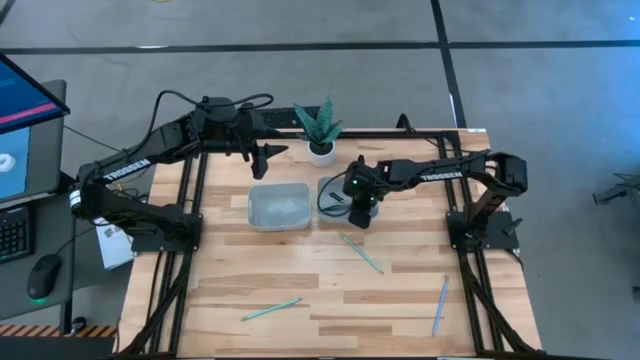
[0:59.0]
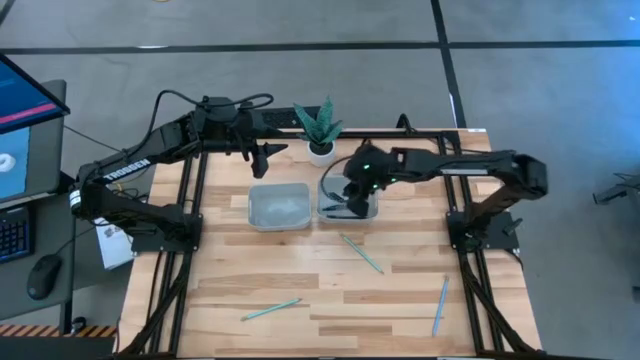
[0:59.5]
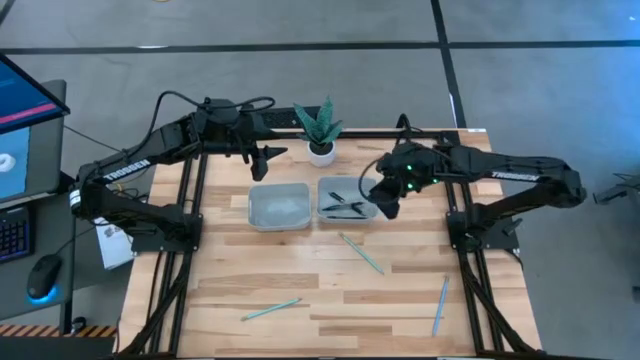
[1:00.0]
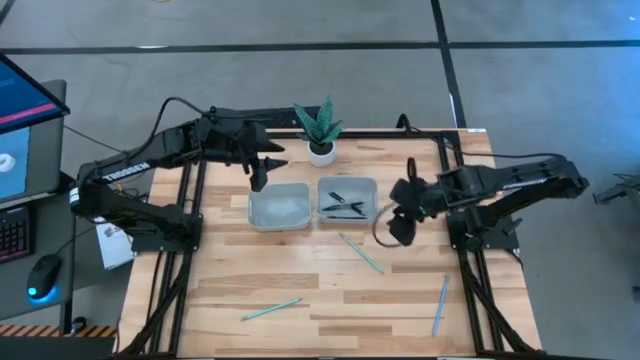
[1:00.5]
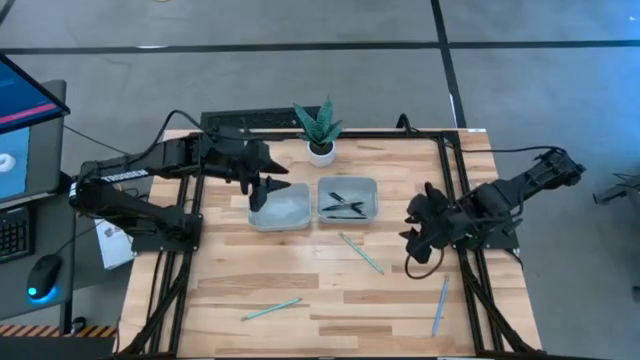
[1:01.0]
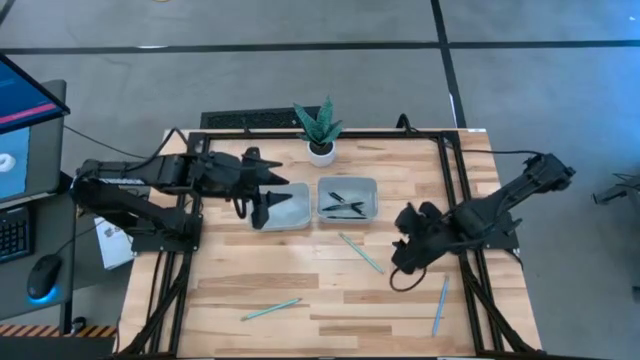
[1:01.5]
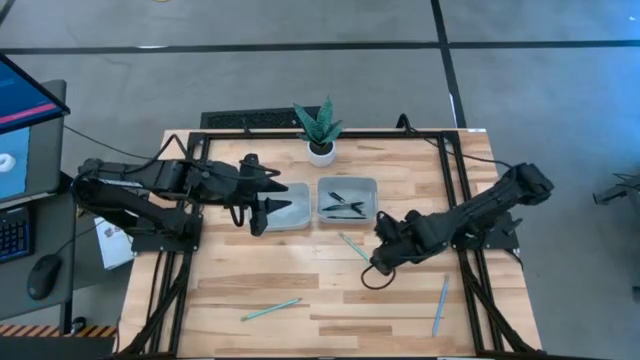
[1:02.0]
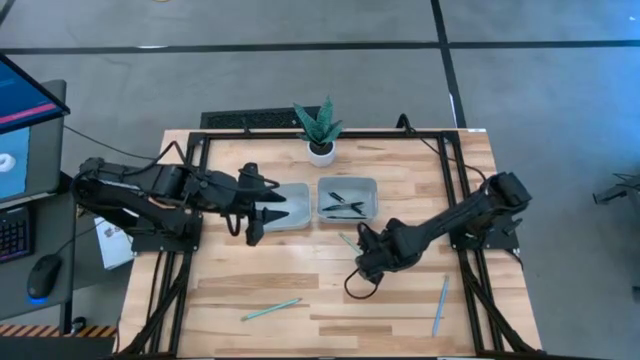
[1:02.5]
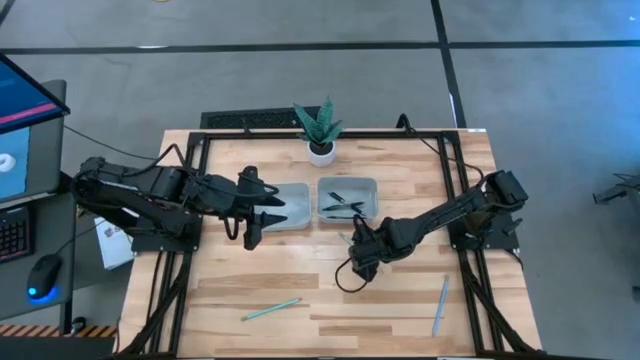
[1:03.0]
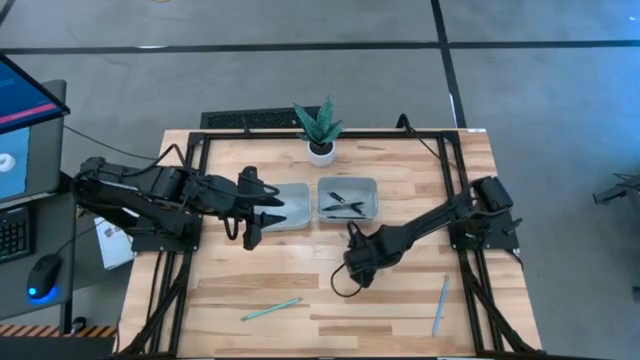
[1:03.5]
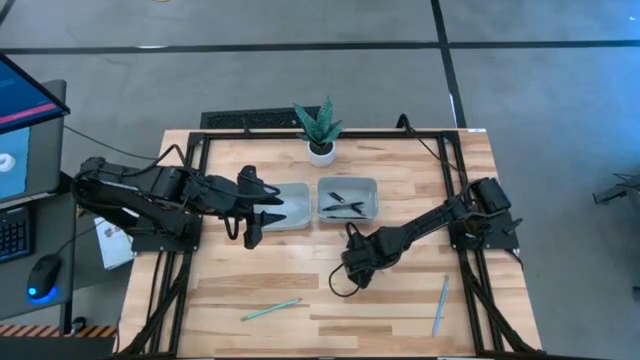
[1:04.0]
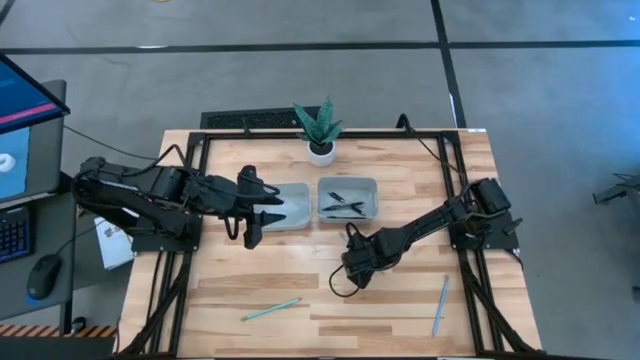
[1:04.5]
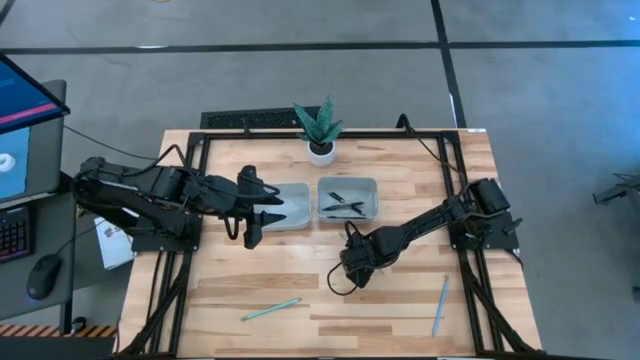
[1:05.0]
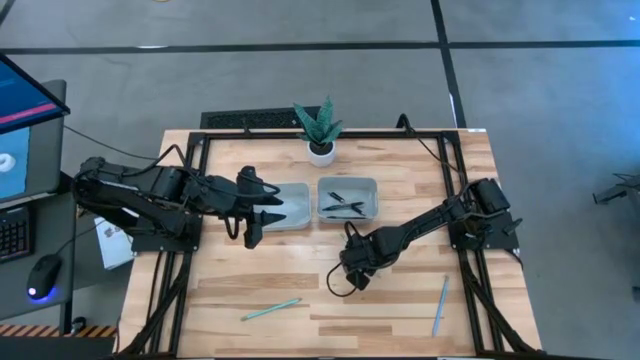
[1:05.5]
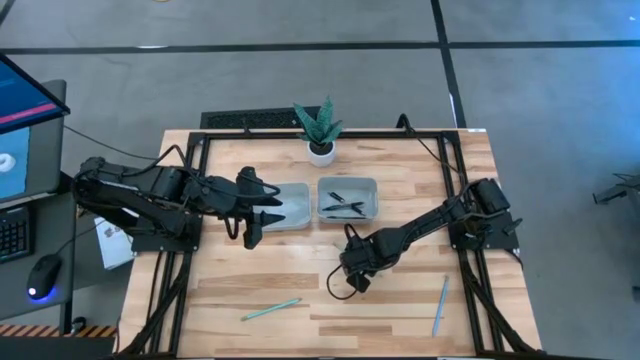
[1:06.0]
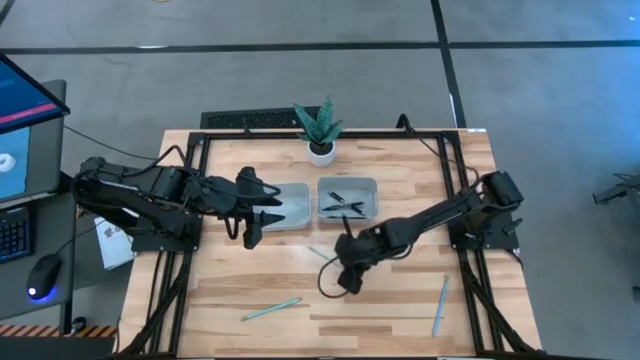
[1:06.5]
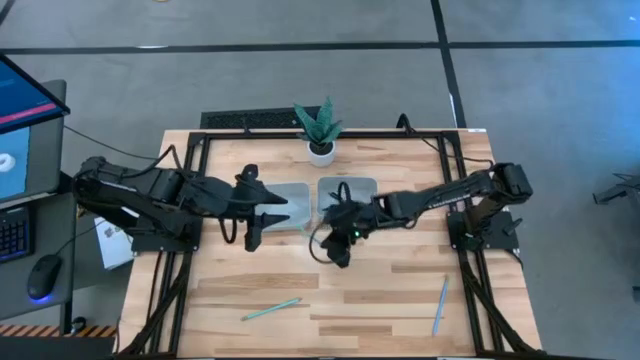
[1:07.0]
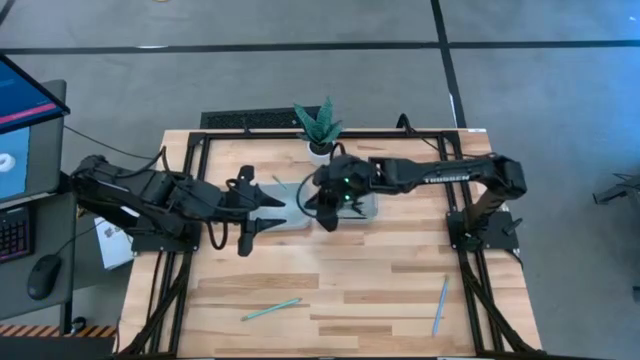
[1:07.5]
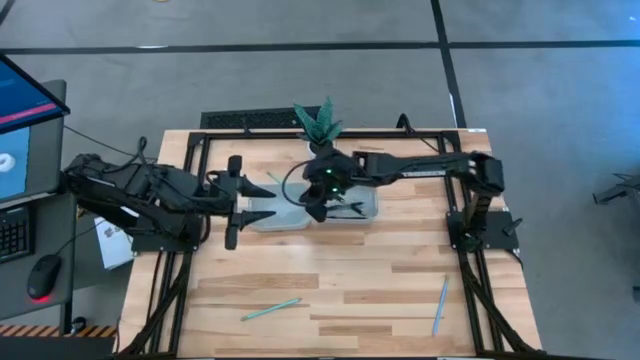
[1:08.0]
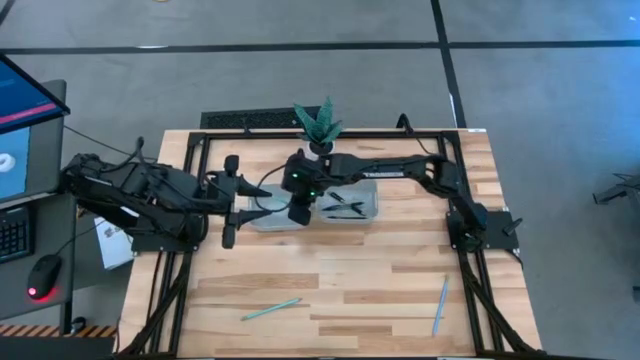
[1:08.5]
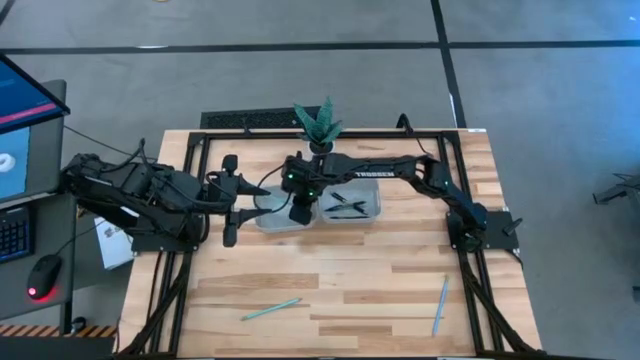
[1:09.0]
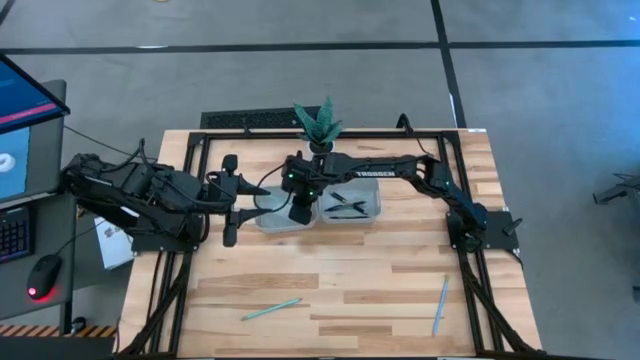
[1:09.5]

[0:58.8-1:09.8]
Task: Sort pens & pencils
Put the top green pencil into the left gray bin

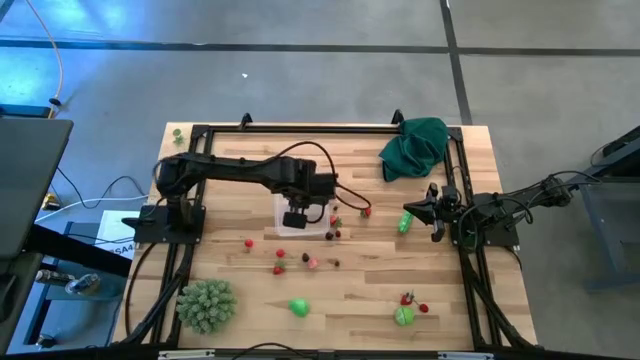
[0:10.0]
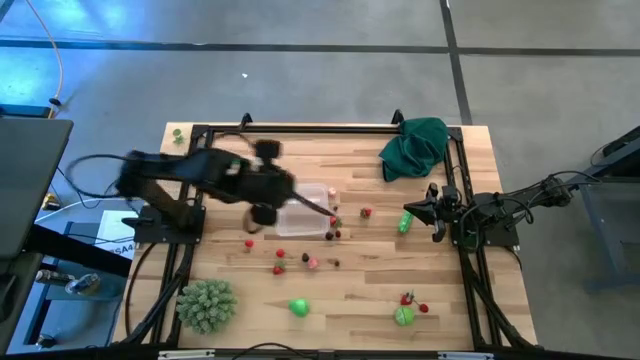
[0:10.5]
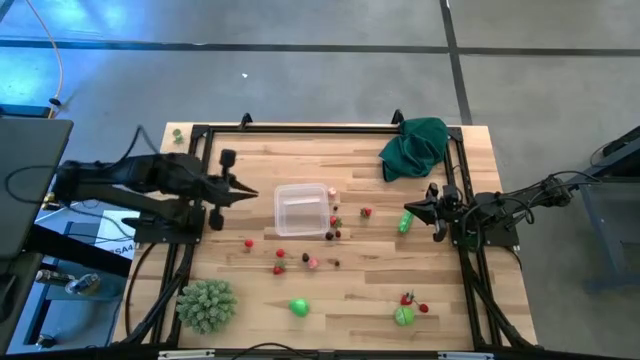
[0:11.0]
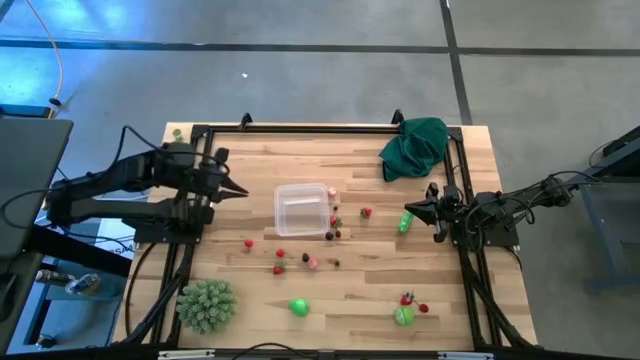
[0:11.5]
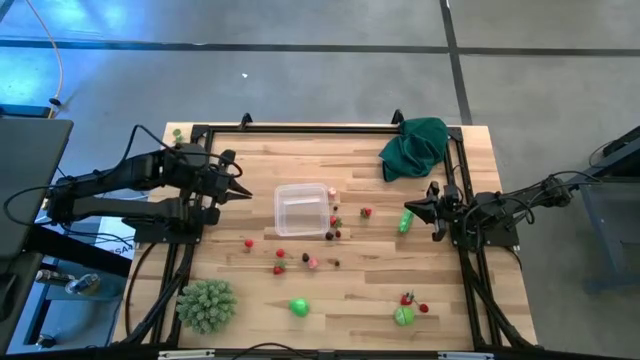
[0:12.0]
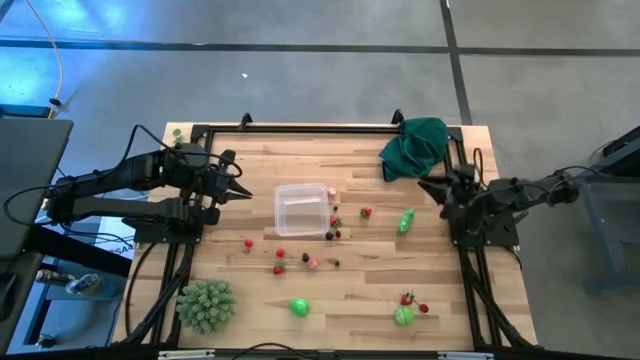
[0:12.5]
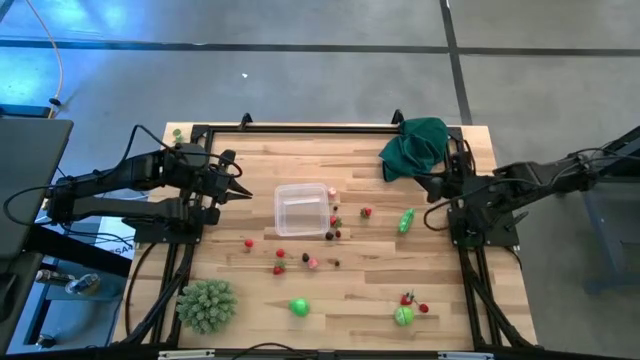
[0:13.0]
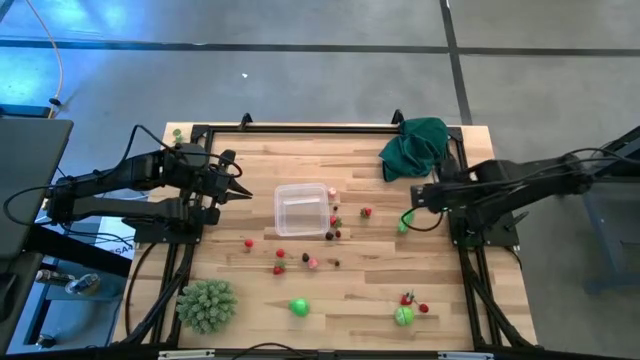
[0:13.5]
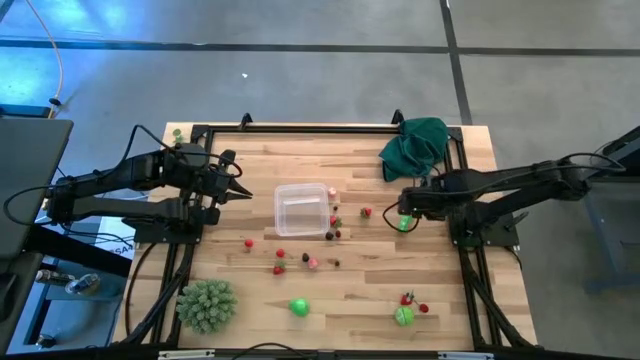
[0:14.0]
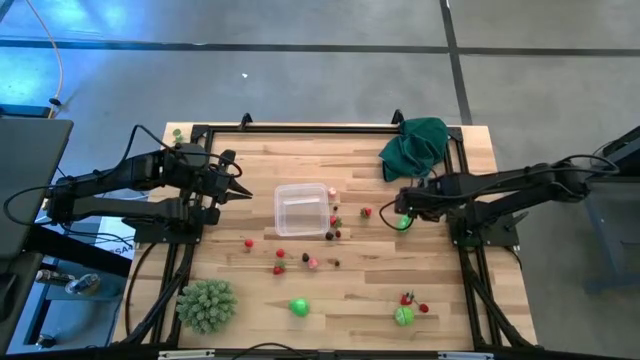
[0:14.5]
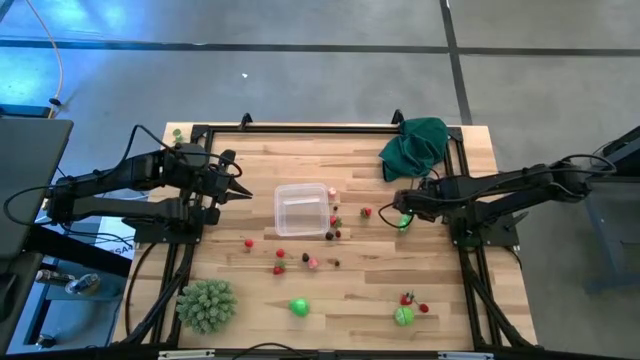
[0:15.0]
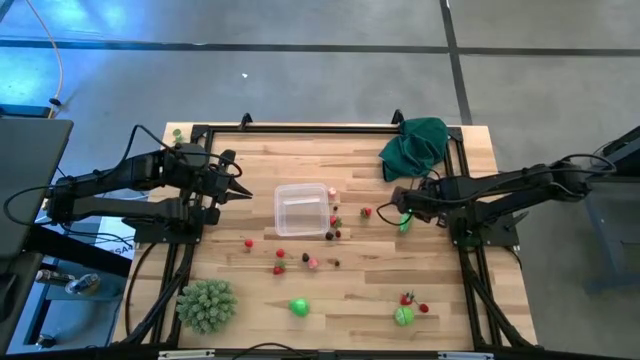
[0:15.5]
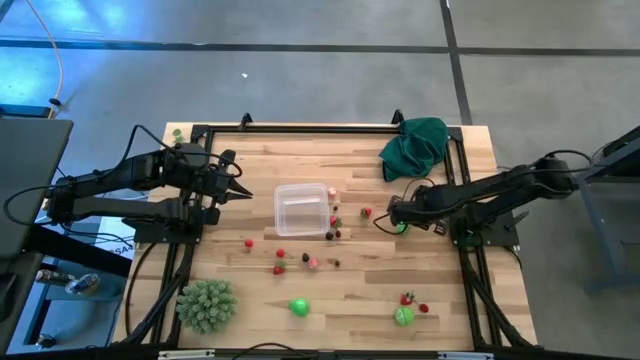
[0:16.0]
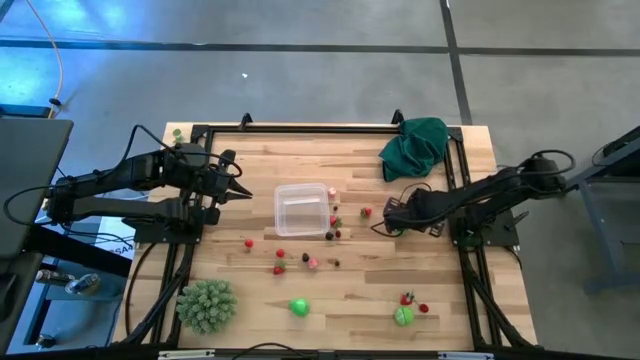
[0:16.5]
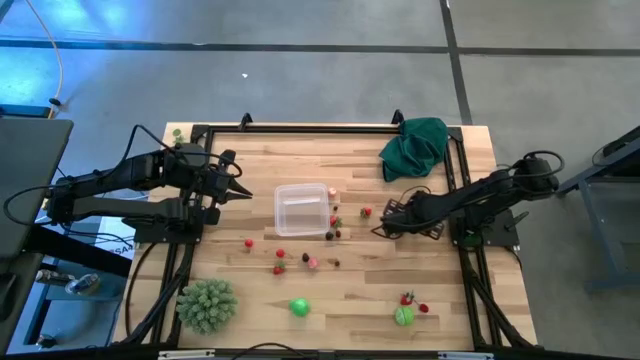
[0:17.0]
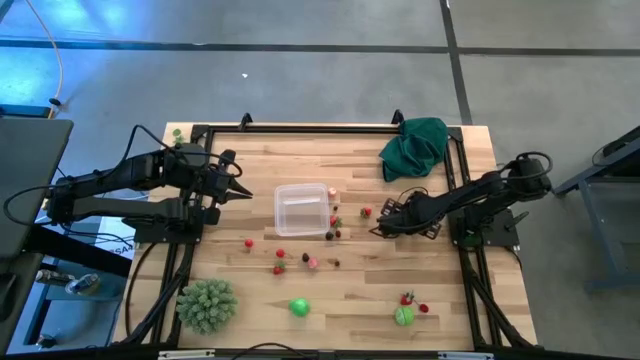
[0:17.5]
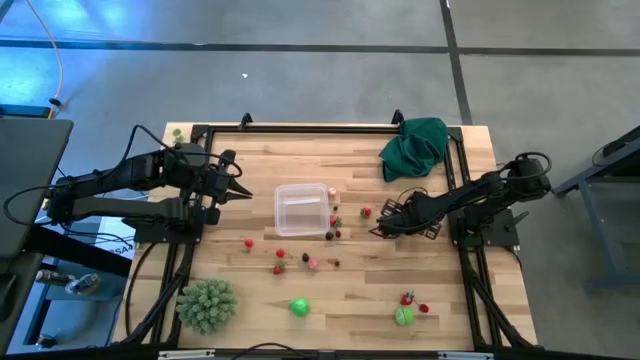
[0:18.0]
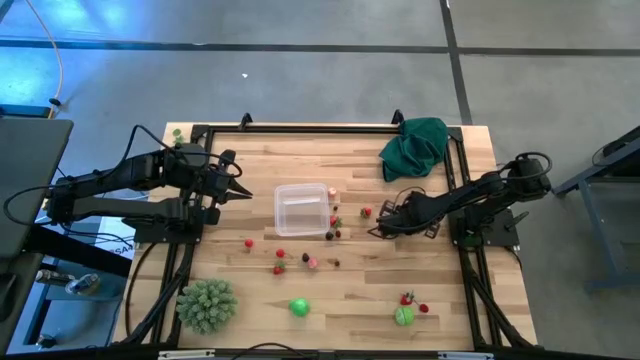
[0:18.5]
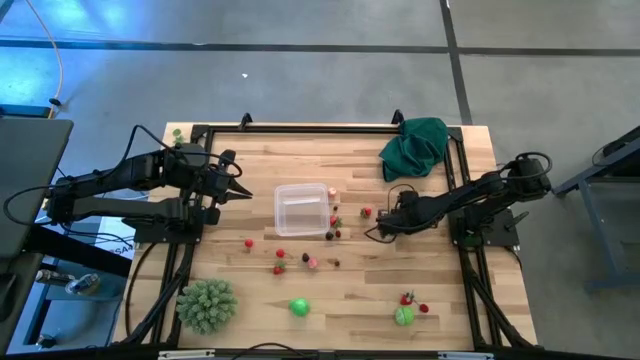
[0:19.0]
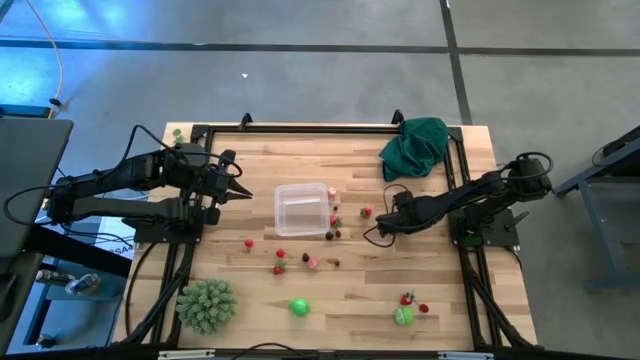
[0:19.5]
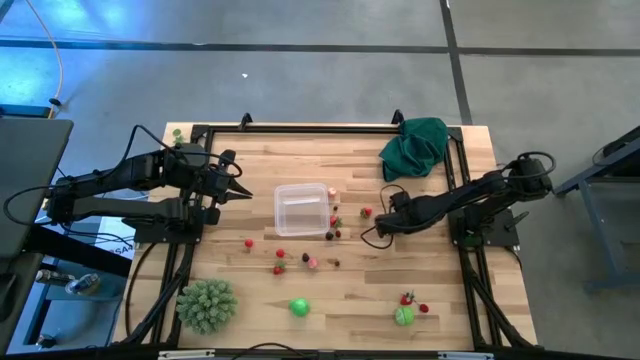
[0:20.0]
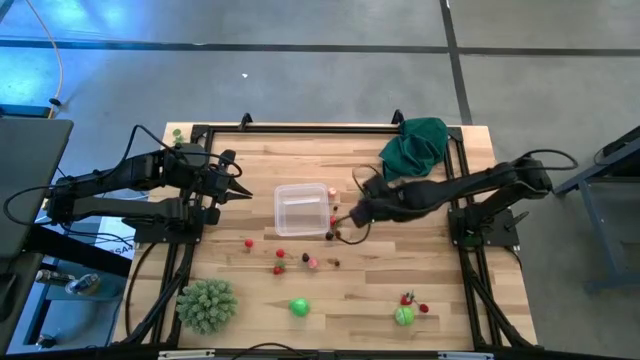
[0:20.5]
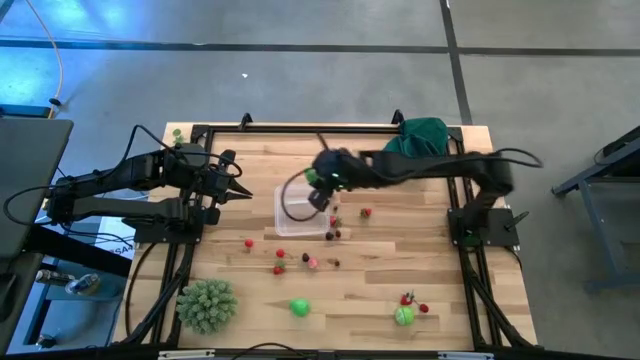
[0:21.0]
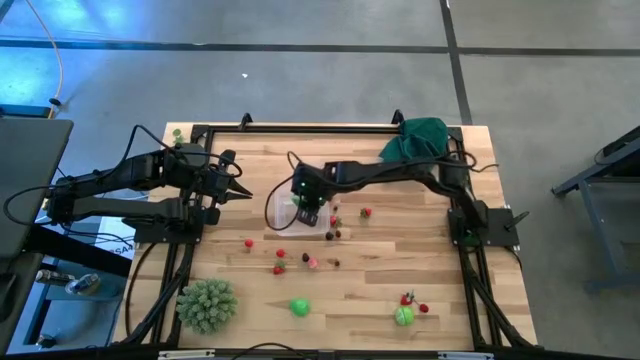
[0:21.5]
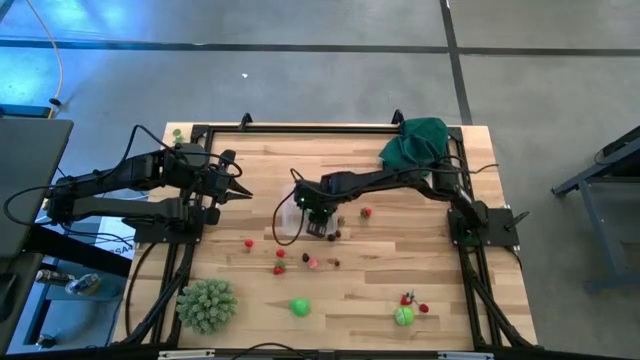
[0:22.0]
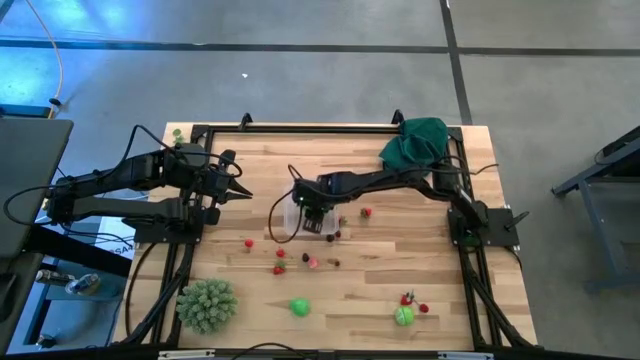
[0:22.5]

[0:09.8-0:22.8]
Task: Pick and placing Produce into tupperware
Put the green pea into the transparent container
